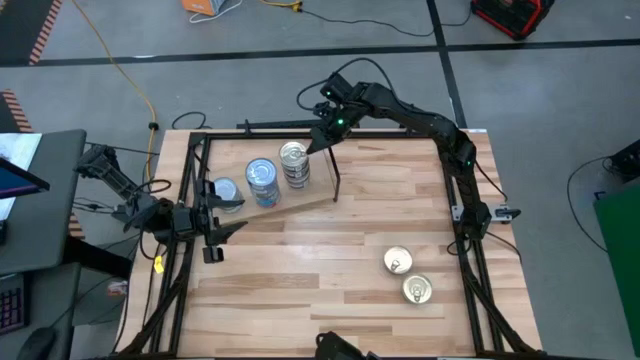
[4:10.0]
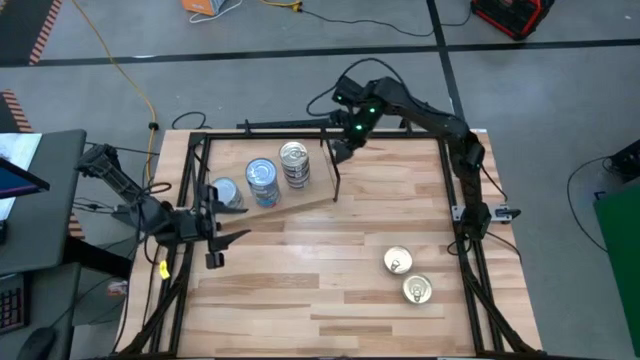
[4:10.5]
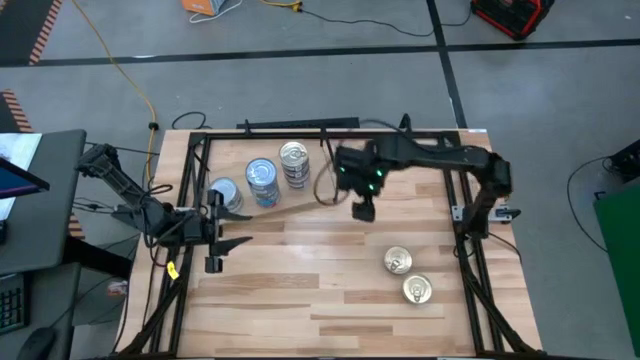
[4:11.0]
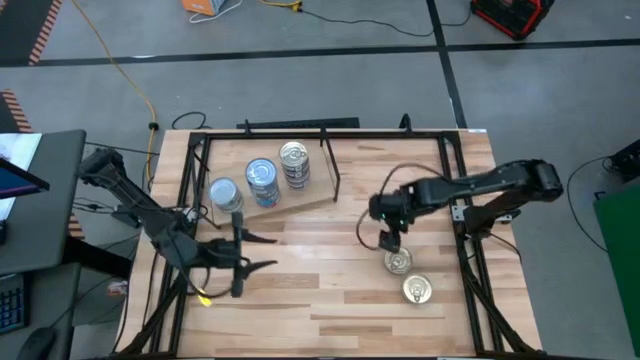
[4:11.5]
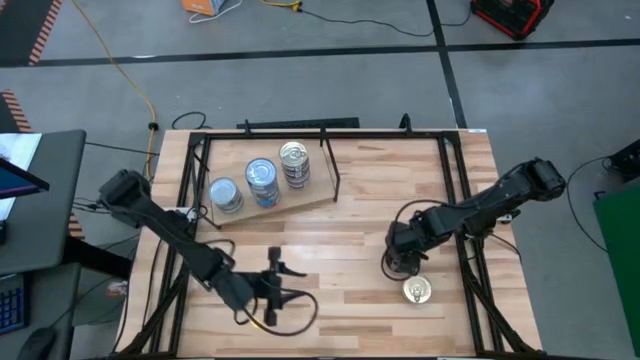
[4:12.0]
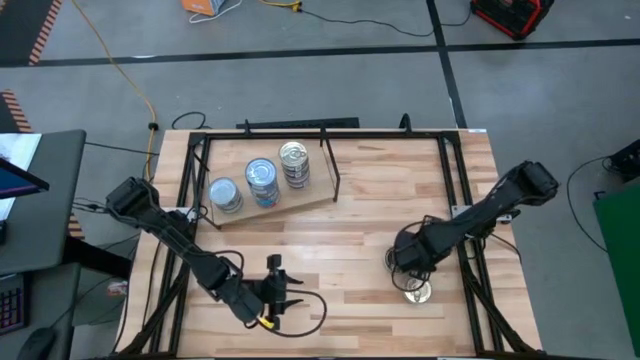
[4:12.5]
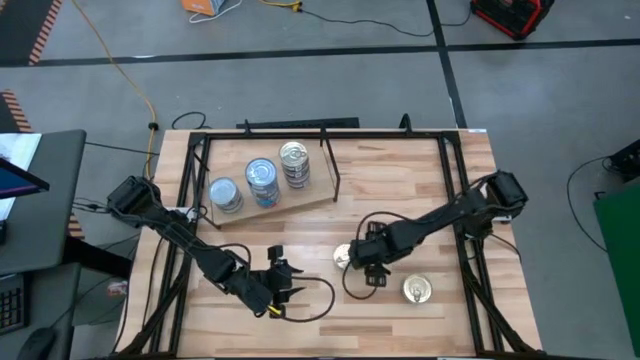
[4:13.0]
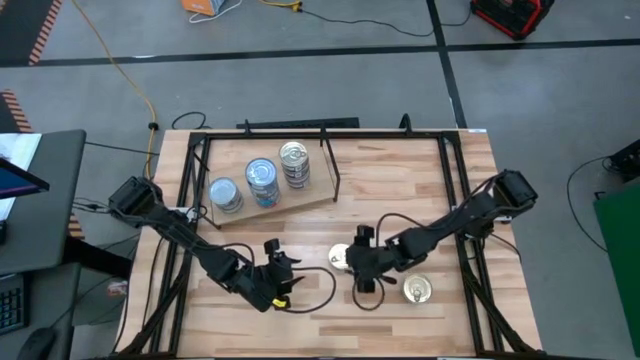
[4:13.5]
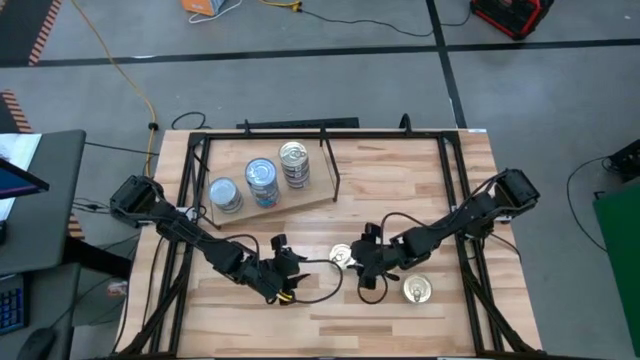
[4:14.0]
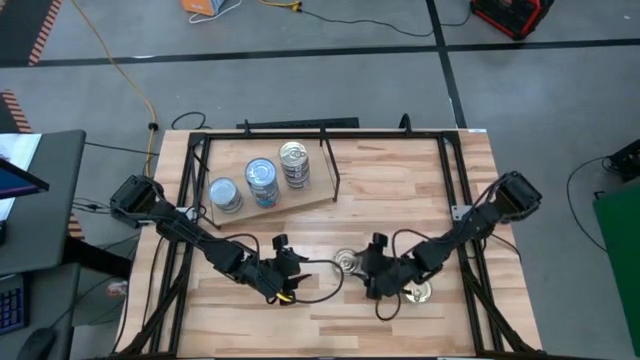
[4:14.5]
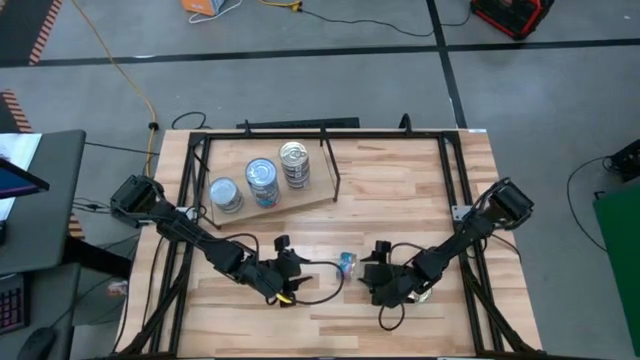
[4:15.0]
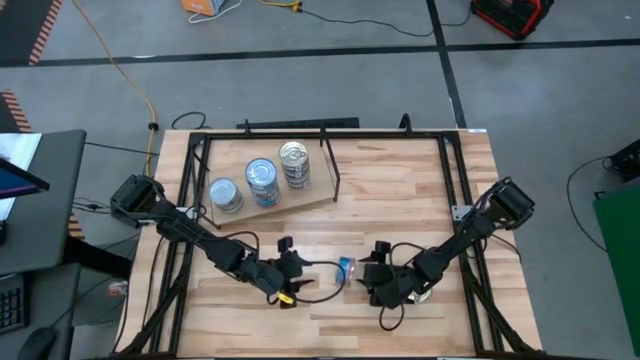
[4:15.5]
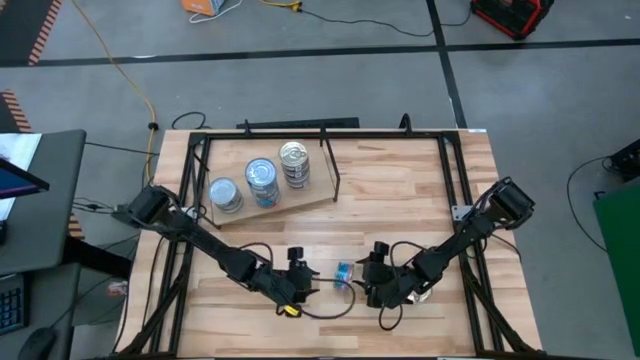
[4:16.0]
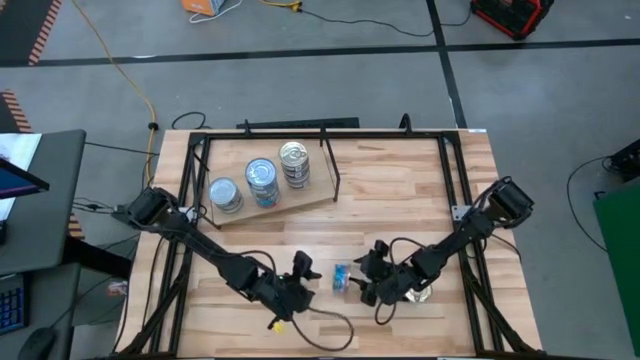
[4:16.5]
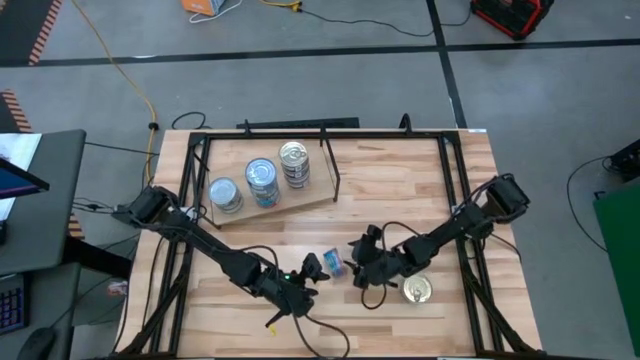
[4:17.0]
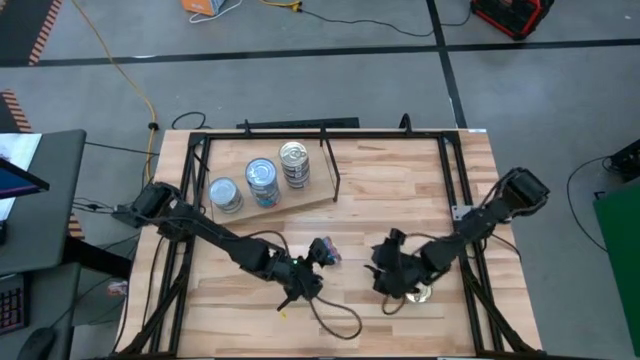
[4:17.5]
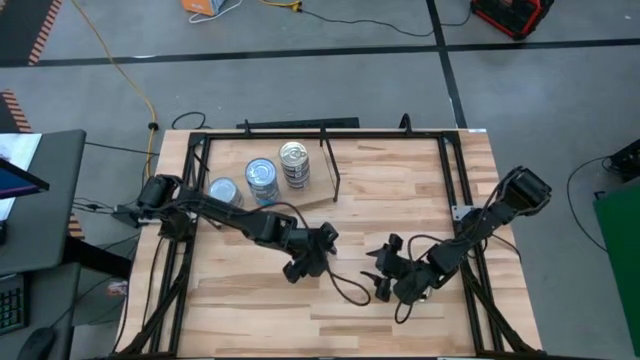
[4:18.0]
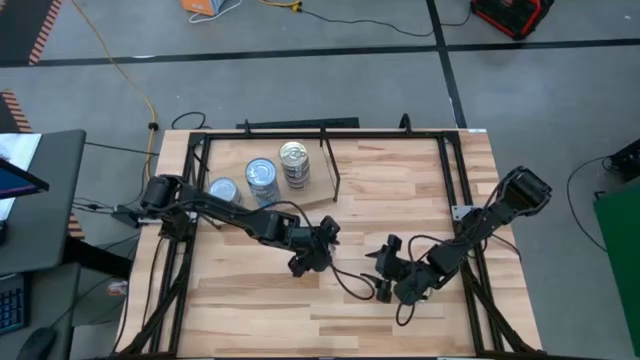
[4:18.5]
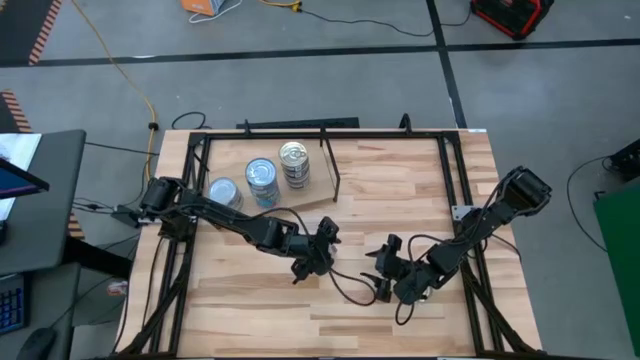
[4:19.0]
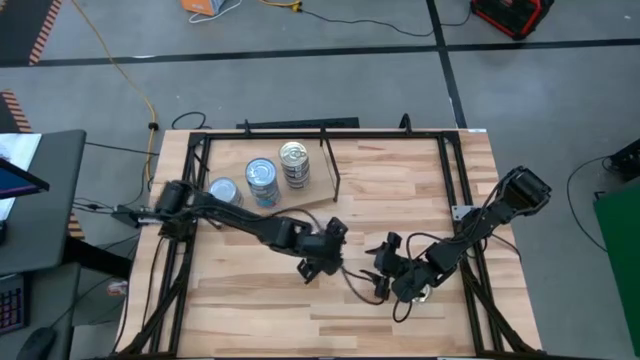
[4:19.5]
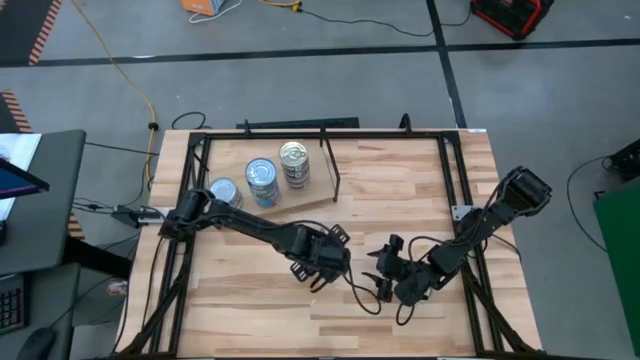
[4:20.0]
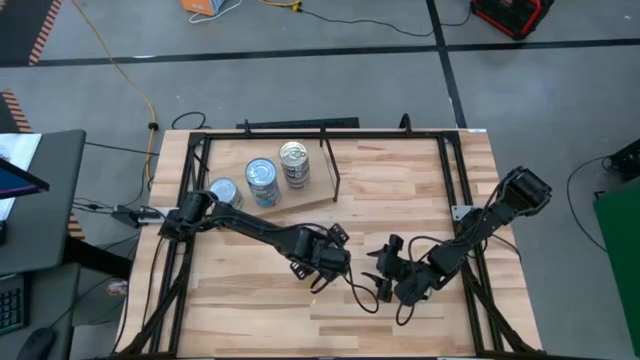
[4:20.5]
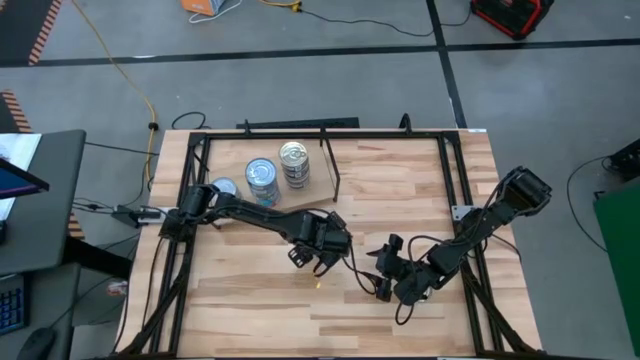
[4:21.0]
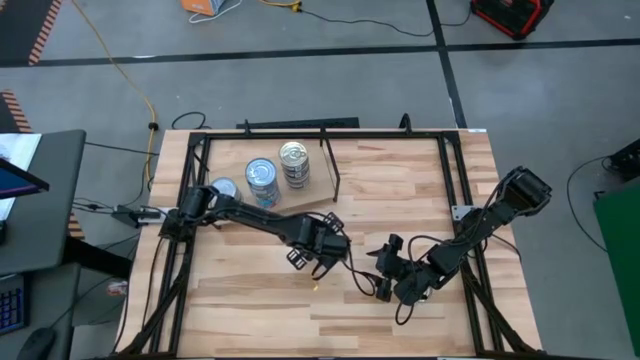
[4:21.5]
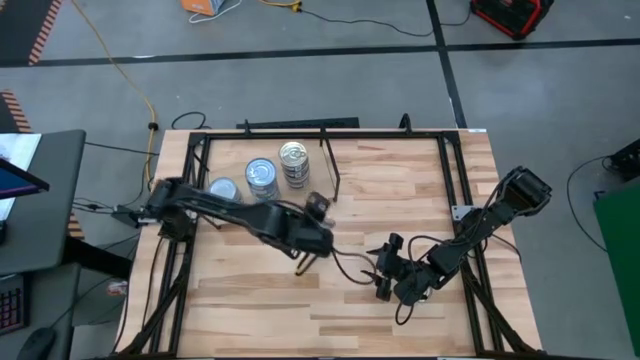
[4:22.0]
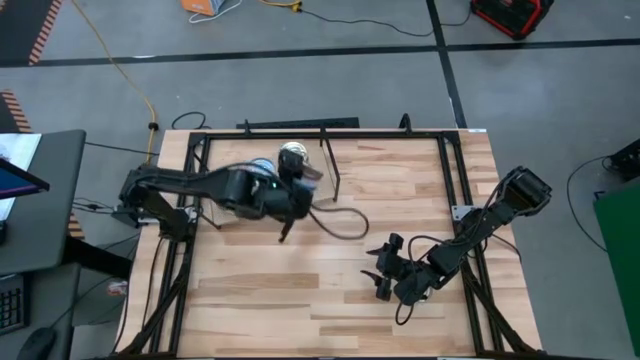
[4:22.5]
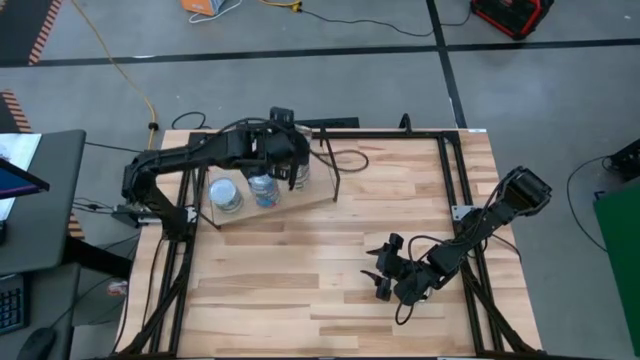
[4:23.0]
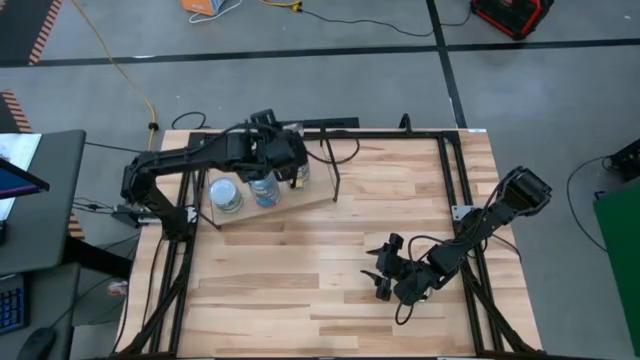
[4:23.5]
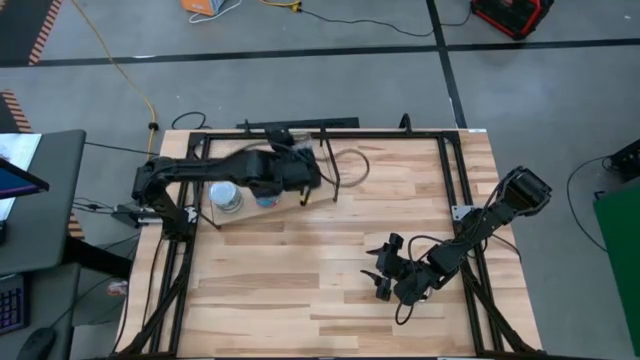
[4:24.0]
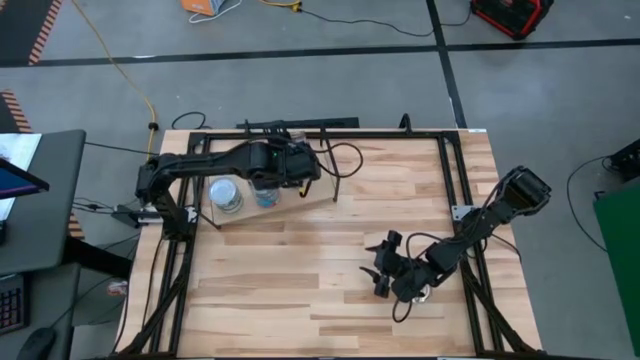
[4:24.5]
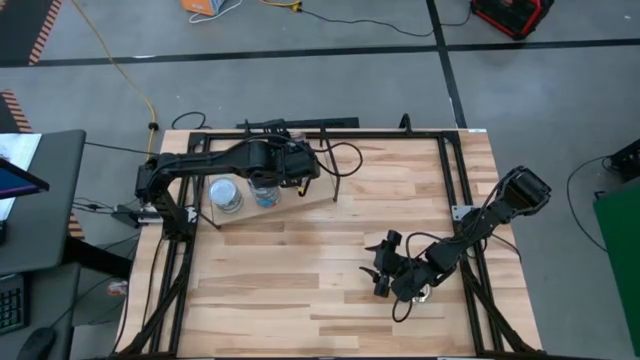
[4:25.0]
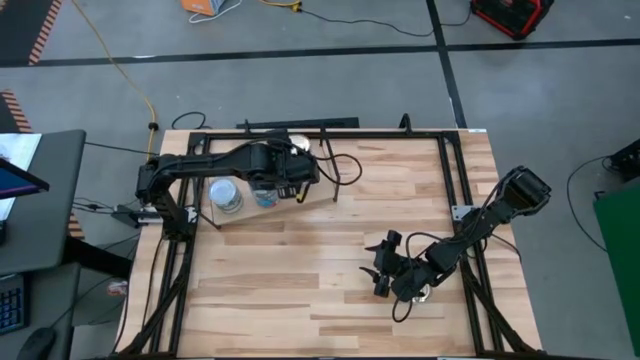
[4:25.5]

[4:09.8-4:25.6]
Task: Stack canned seafood by type on shelf
Stack the blue pink tuna can on top of the blue pink tuna can on the shelf

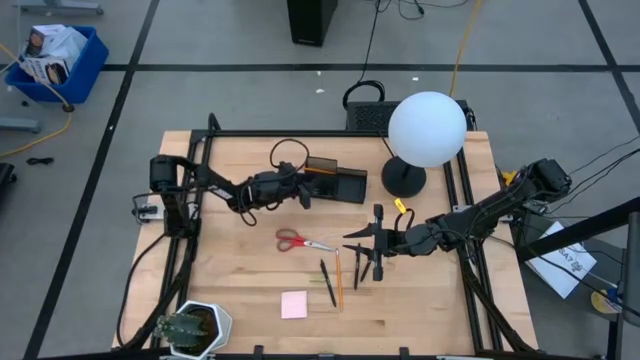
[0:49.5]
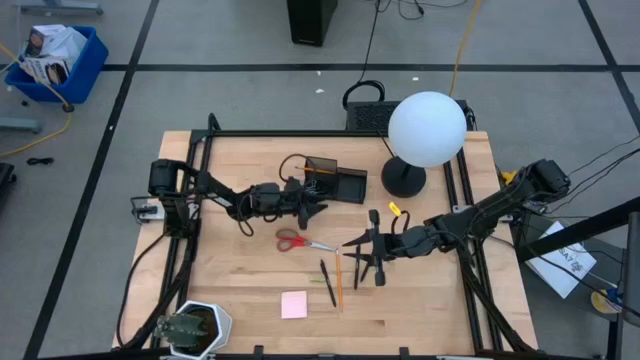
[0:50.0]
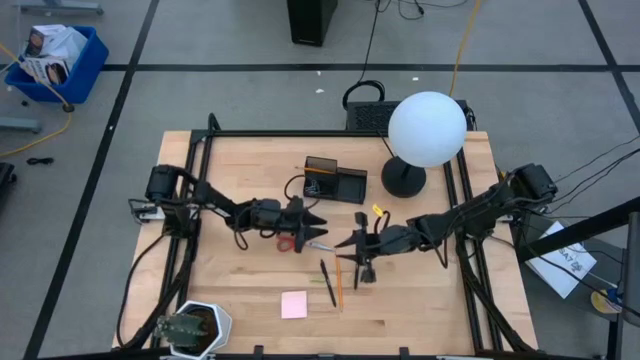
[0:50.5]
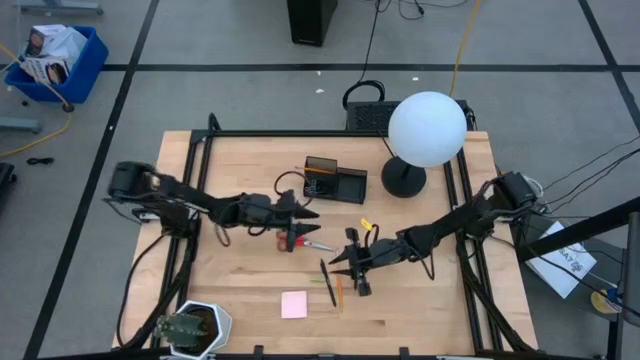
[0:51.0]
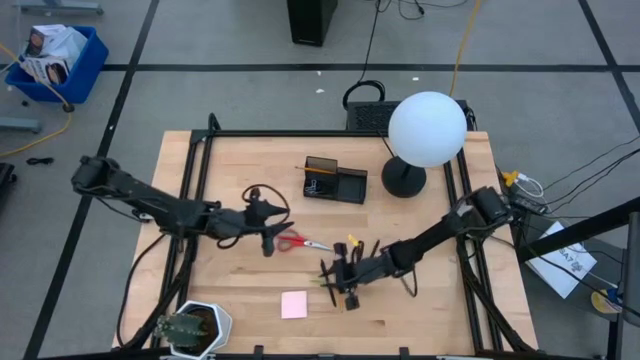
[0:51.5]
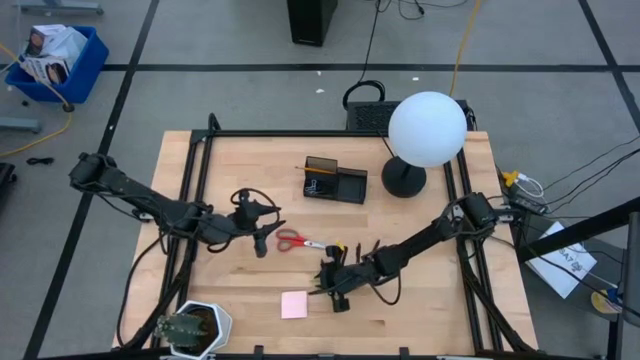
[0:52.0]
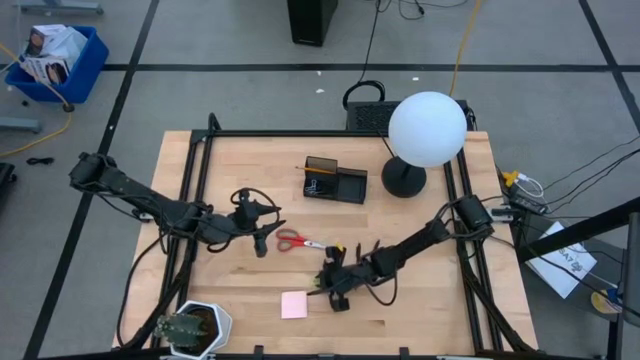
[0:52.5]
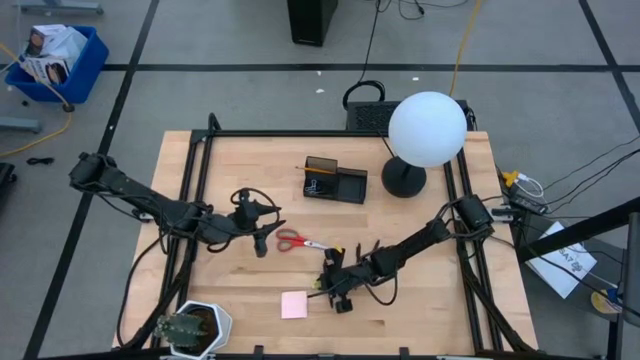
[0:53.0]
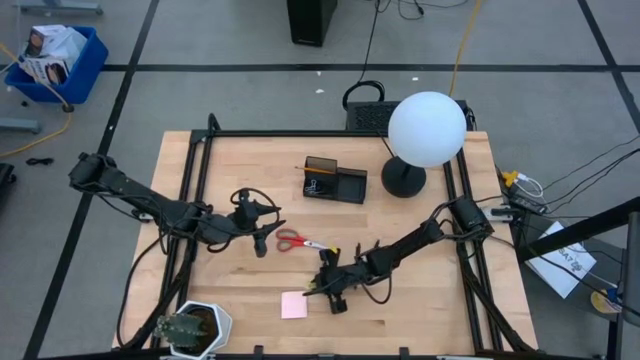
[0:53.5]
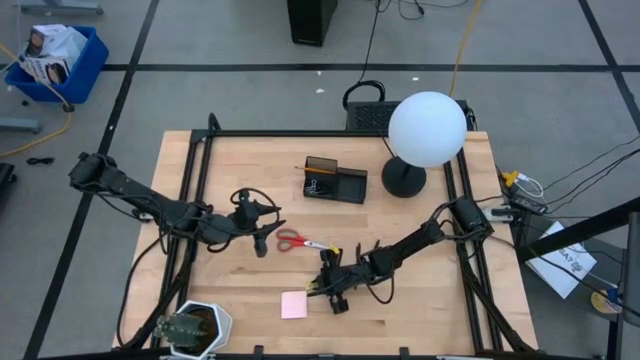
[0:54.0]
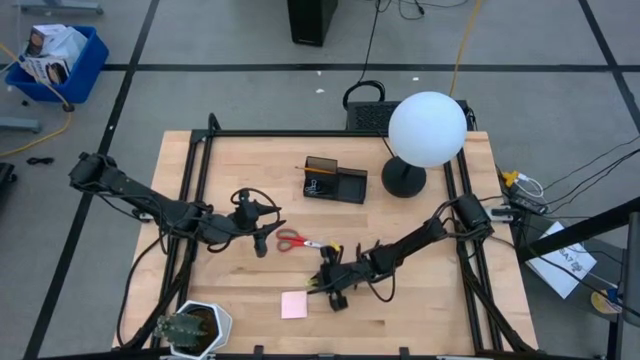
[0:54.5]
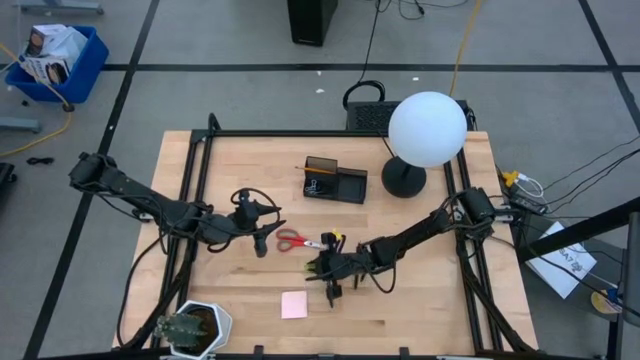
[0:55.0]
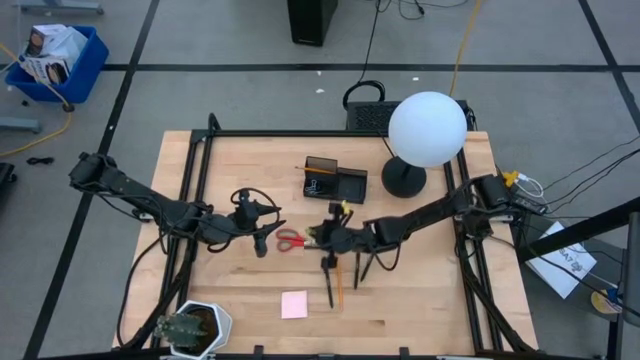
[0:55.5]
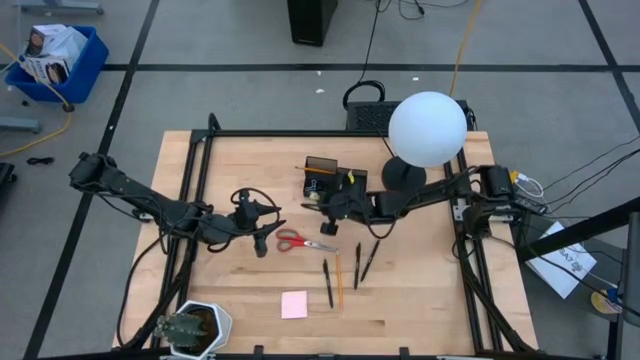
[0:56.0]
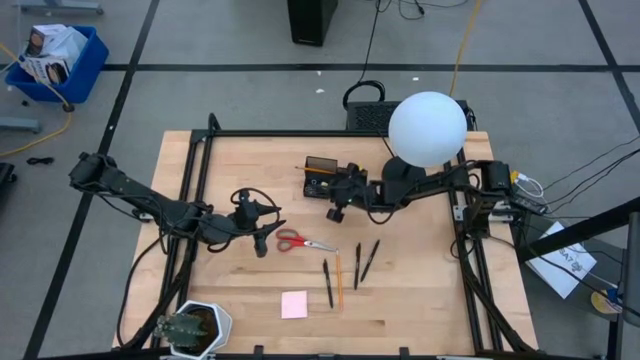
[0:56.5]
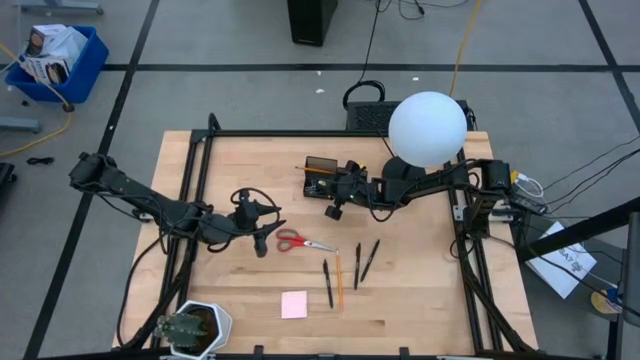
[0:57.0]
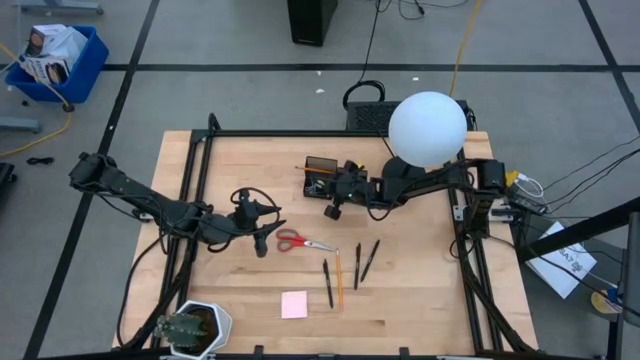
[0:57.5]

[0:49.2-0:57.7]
Task: Pick and place office supplies into organizer
Put the green eraser into the black desk organizer
